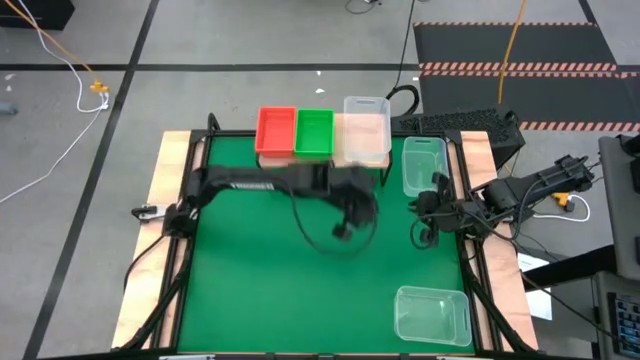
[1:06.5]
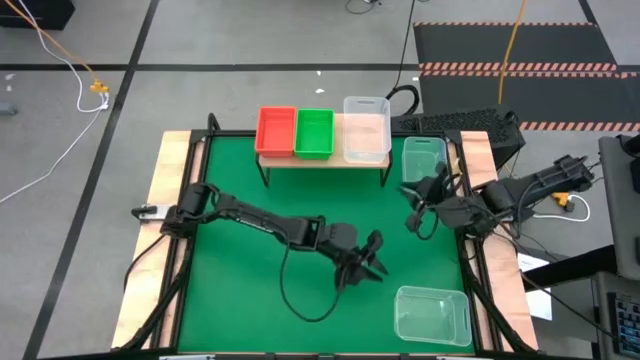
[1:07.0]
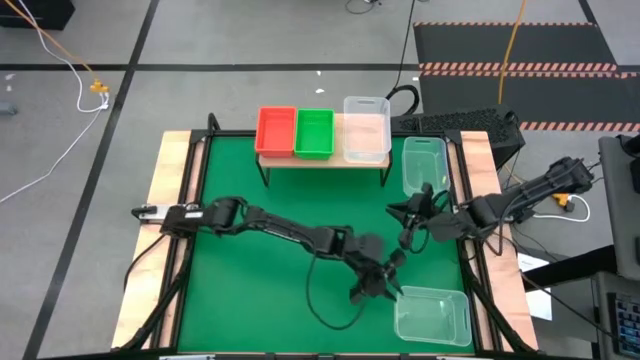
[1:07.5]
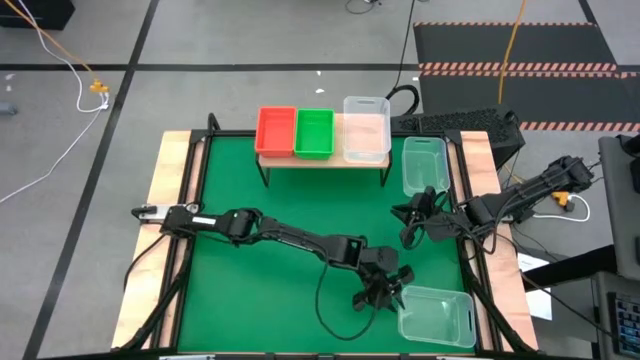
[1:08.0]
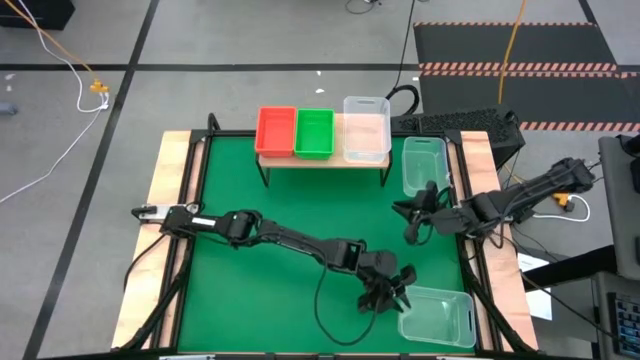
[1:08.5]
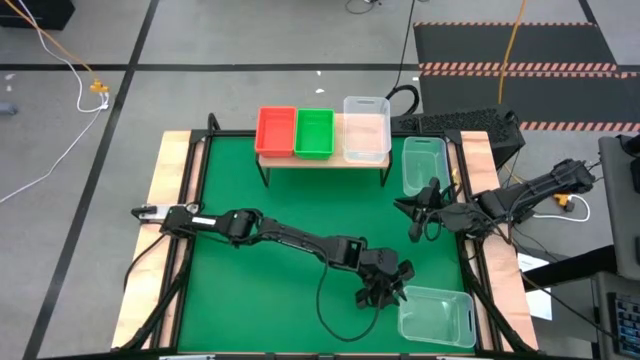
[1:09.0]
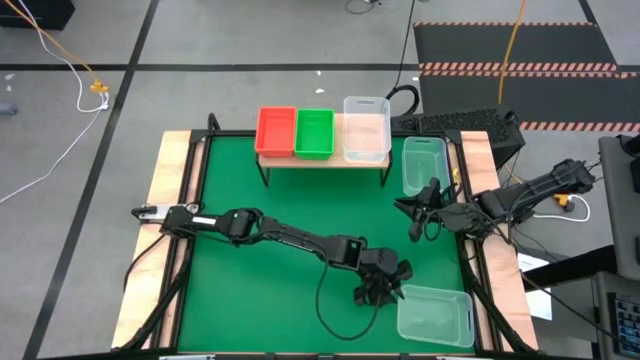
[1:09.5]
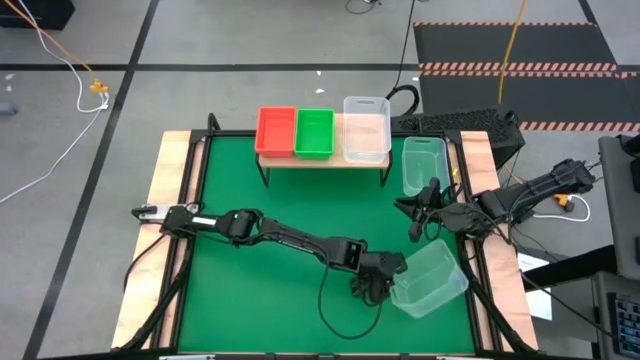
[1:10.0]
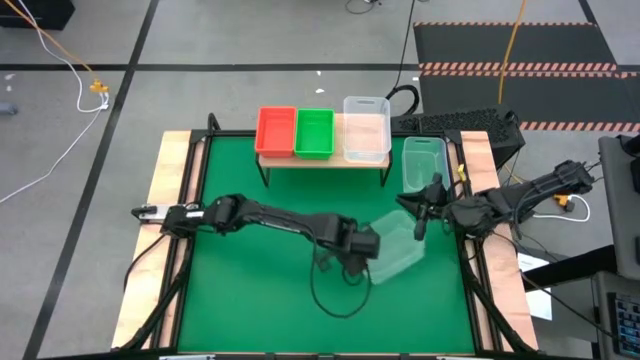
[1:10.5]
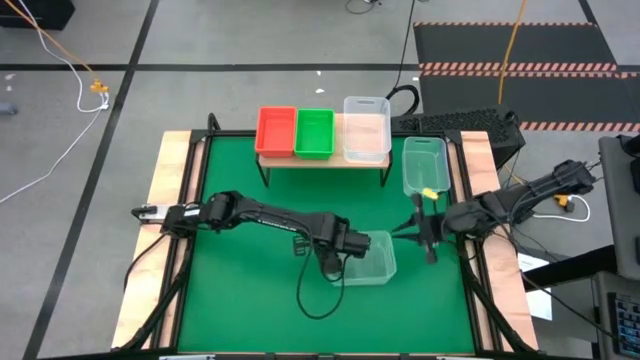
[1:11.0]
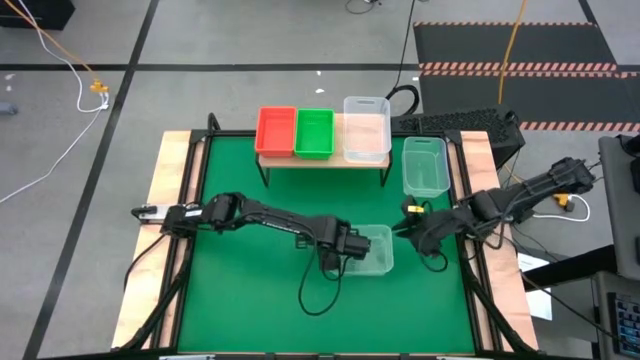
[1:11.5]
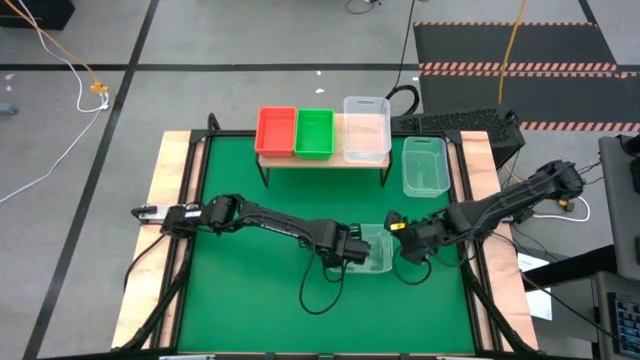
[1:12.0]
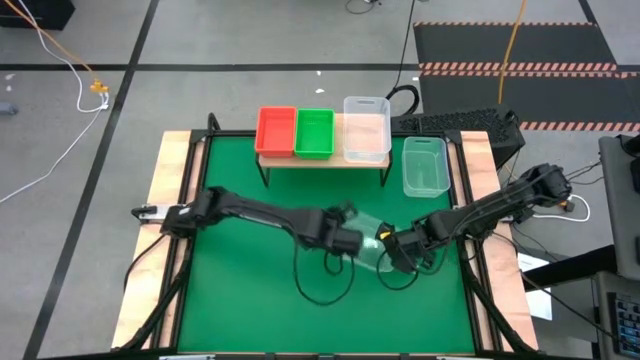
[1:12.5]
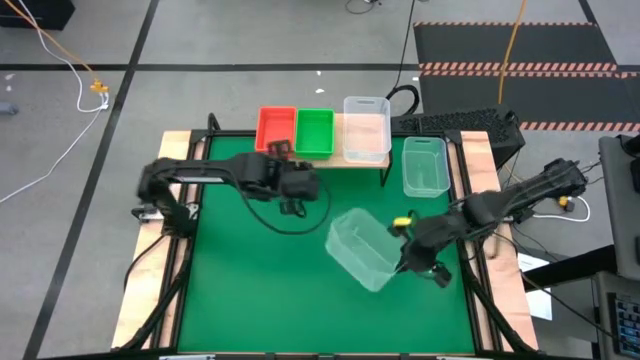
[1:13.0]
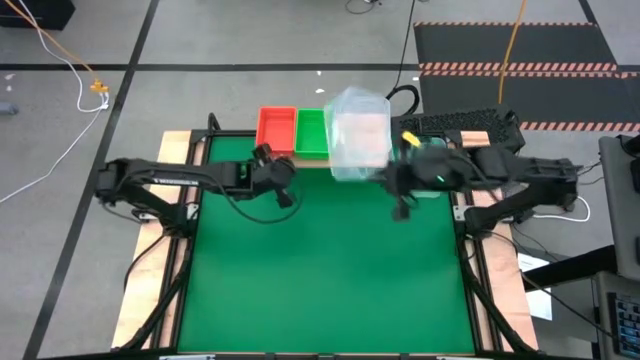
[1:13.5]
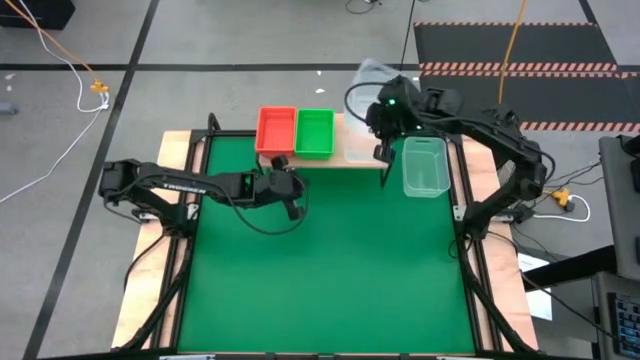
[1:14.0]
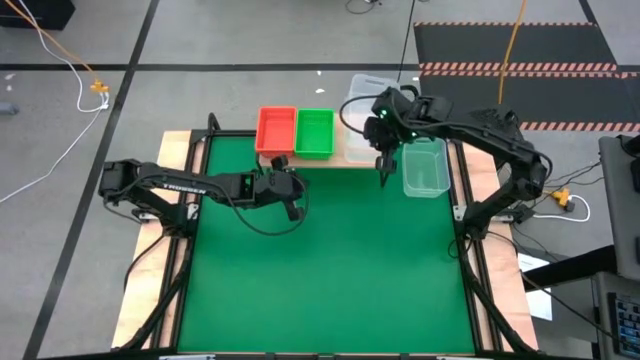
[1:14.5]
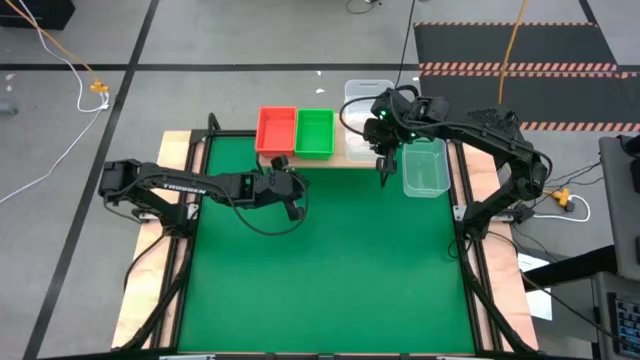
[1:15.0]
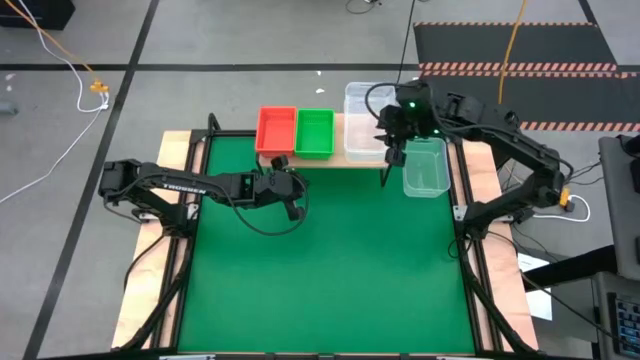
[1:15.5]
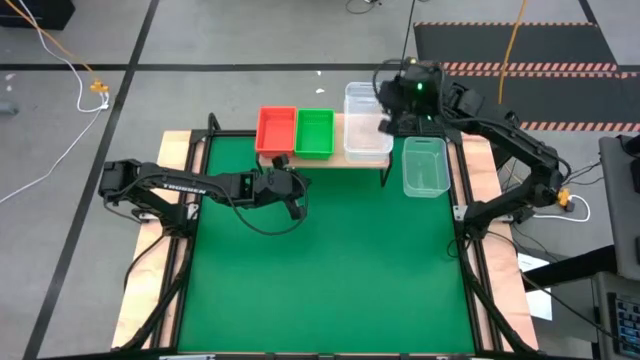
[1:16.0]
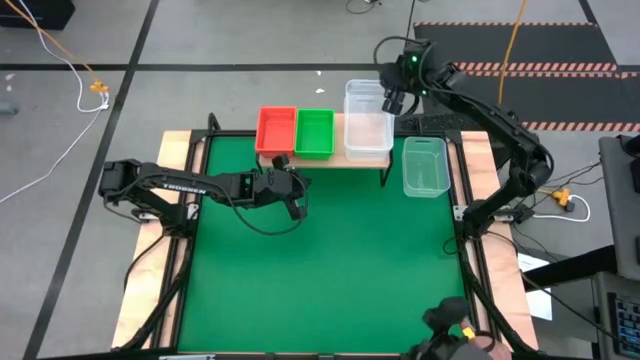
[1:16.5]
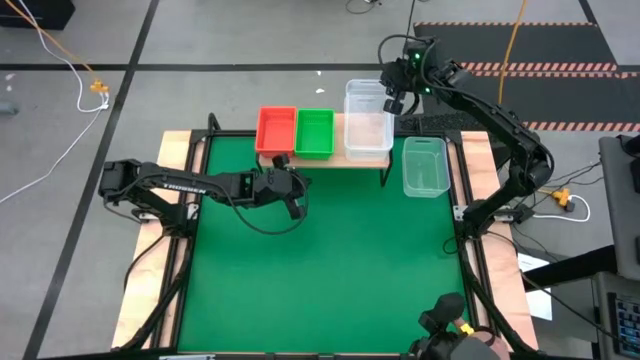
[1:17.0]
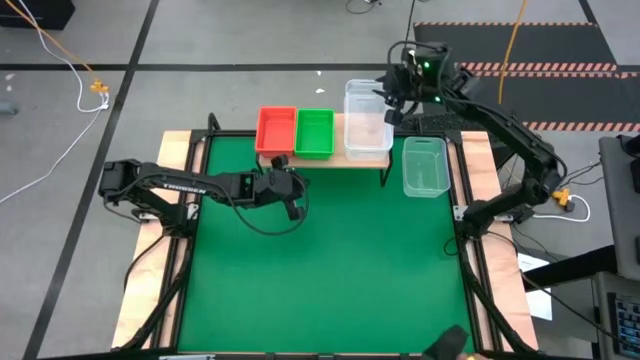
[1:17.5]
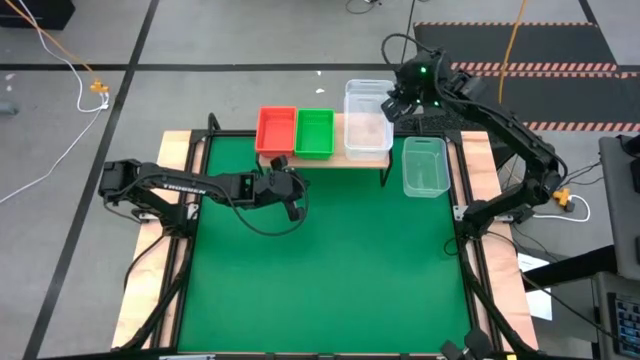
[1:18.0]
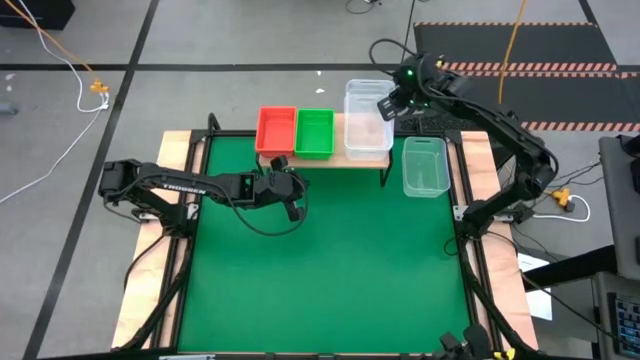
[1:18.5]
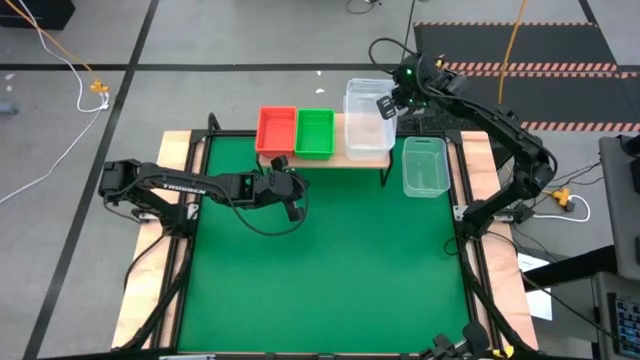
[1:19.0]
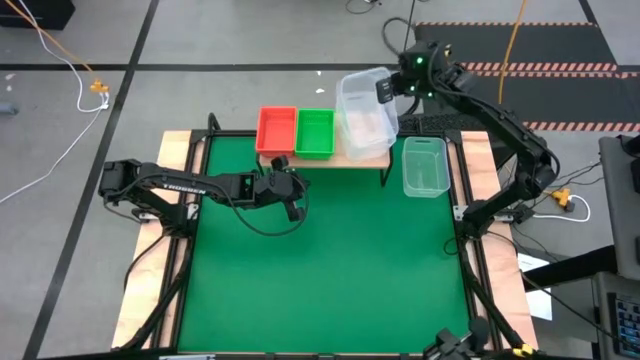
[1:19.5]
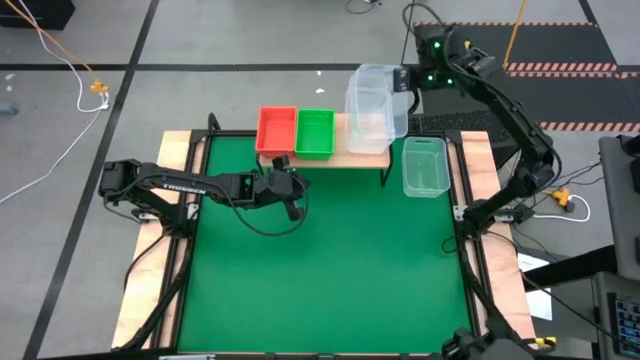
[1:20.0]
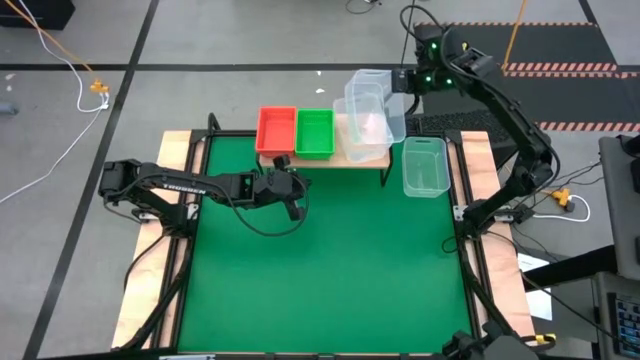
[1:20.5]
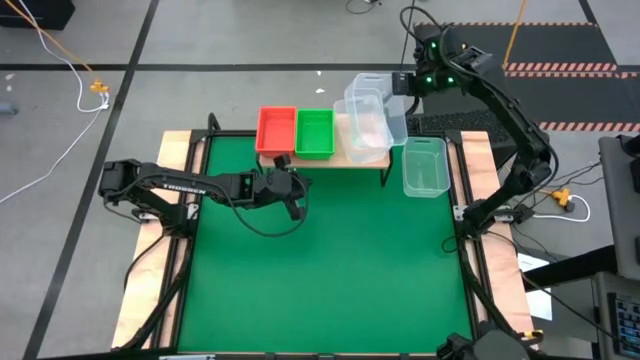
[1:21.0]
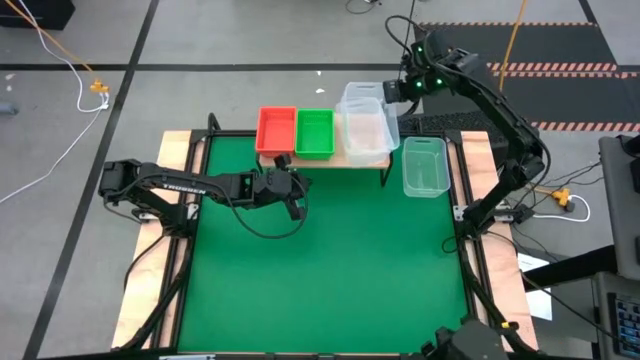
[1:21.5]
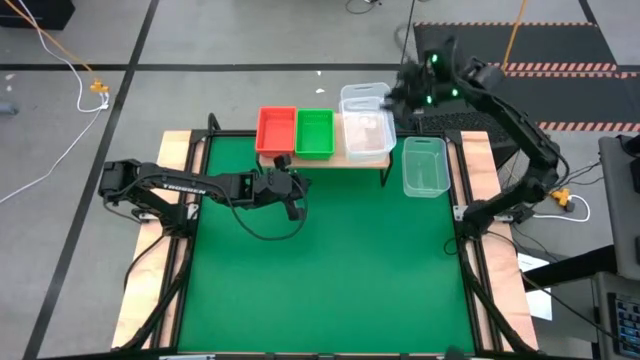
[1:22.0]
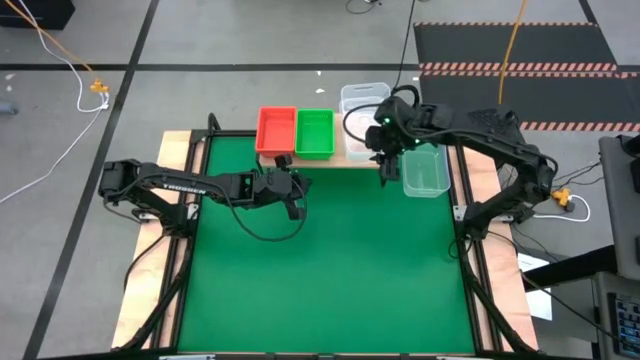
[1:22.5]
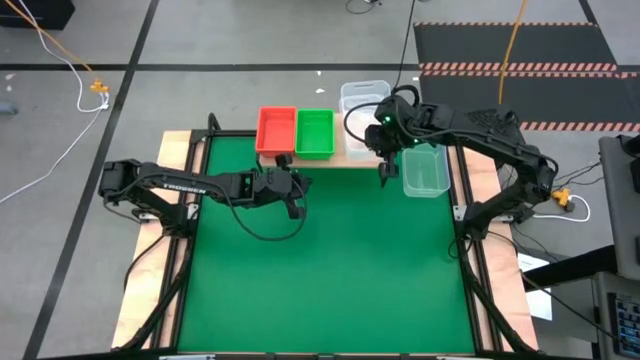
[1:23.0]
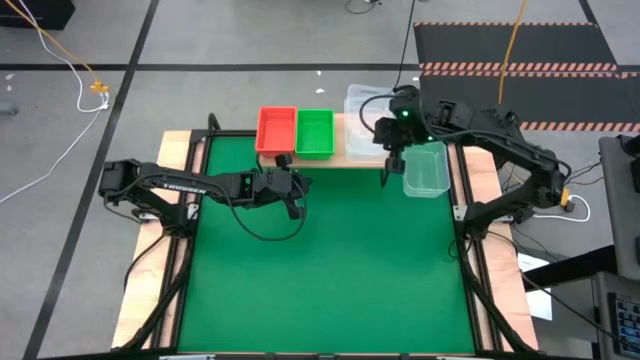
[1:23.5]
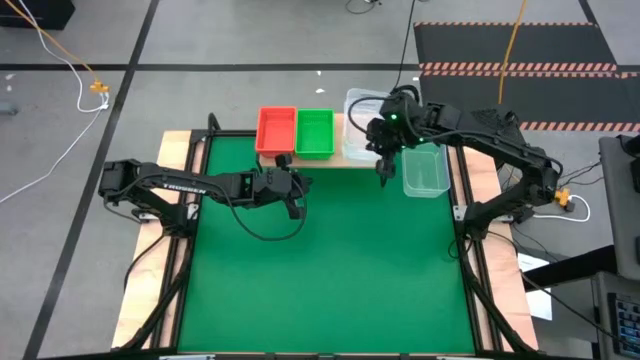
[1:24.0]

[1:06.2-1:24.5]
Task: Stack baskets on shelf by color
Stack the bottom transparent bin on the transparent bin on the shelf

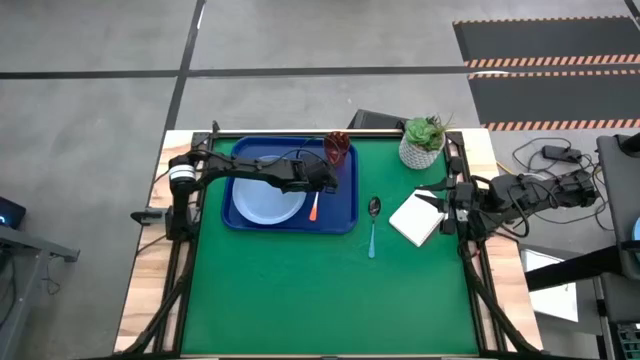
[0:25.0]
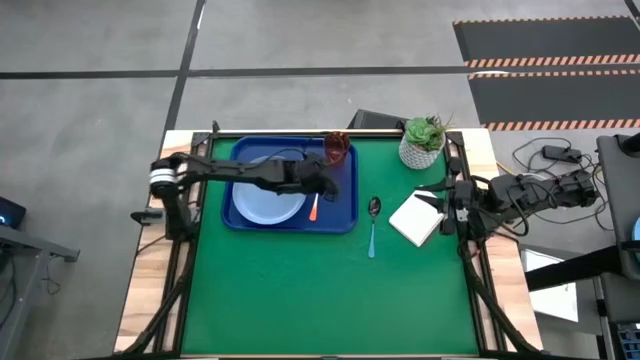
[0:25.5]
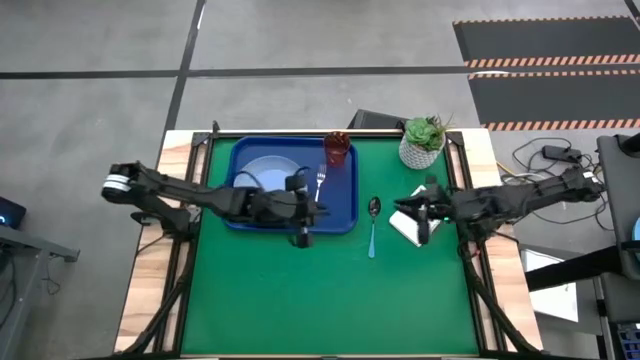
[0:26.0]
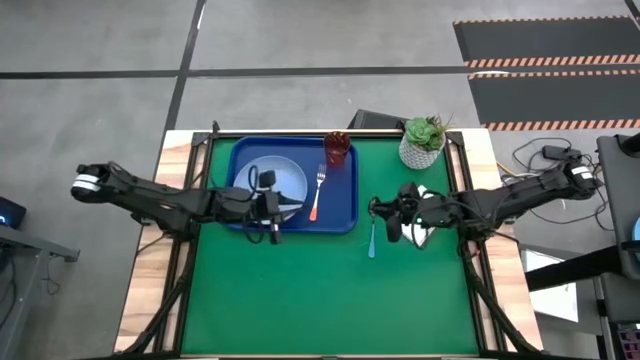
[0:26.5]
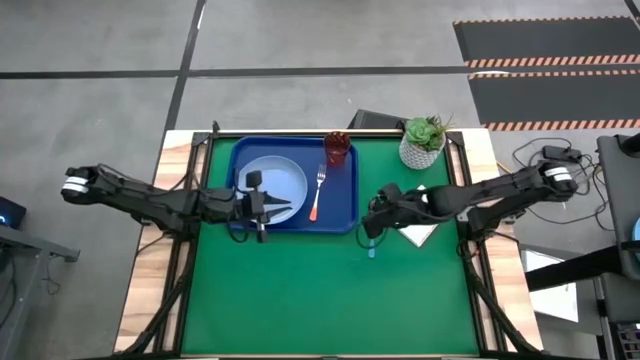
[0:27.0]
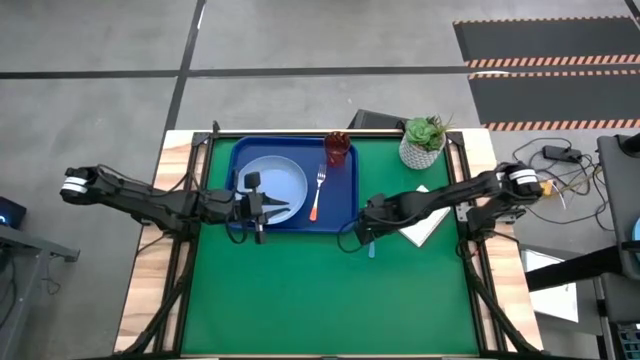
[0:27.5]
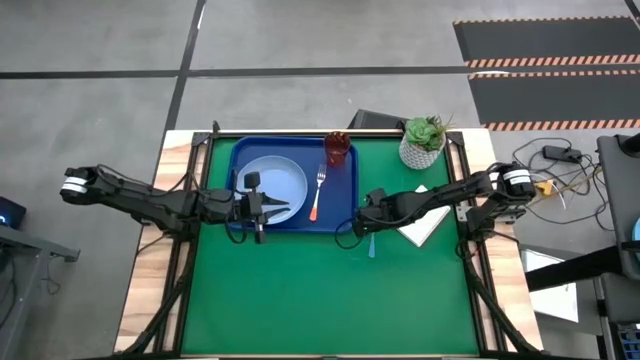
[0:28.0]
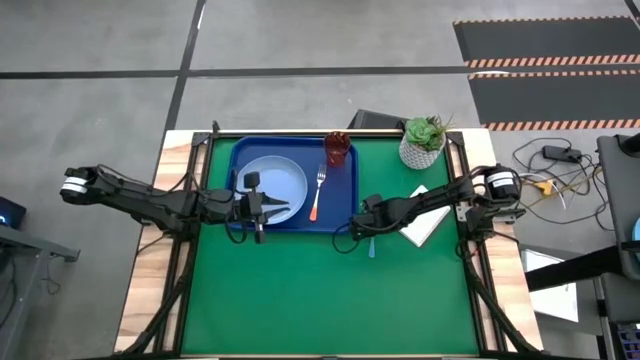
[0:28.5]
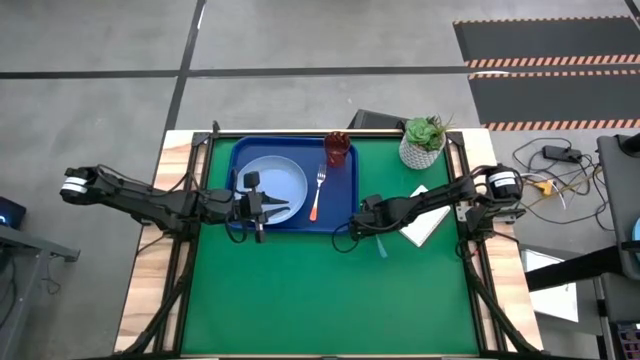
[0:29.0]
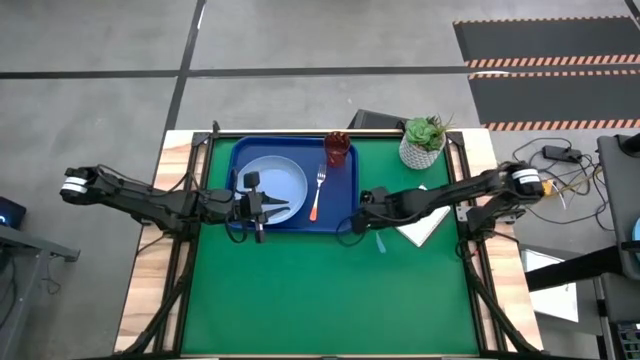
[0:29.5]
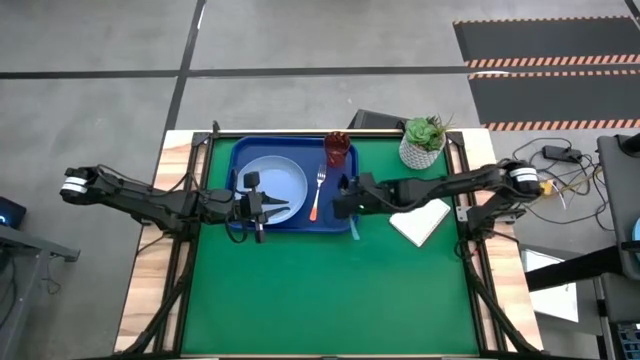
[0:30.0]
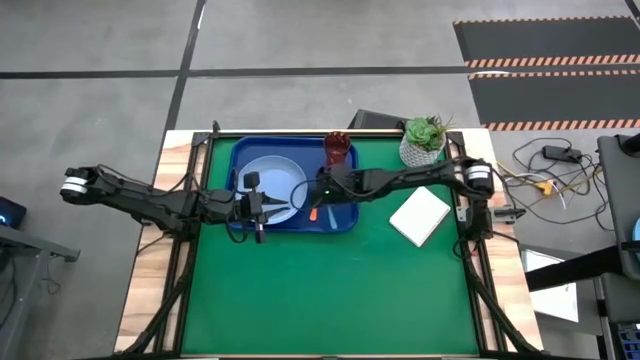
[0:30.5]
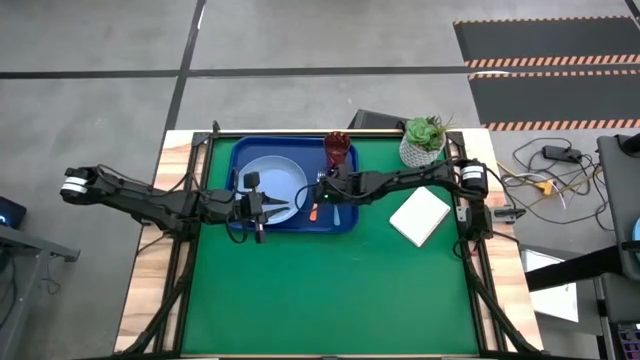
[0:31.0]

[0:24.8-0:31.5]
Task: Pick and place plate/cup/fork/spoon on tray
Put the blue spoon on the blue tray to the right of the orange fork
